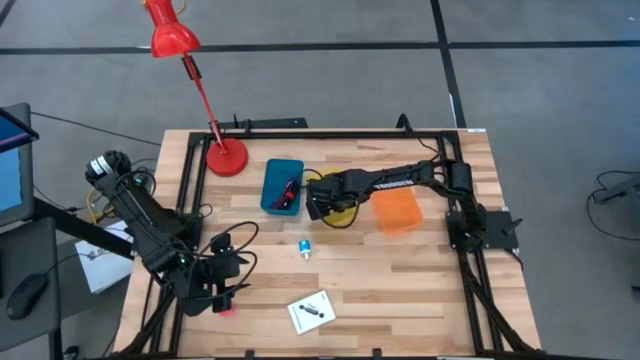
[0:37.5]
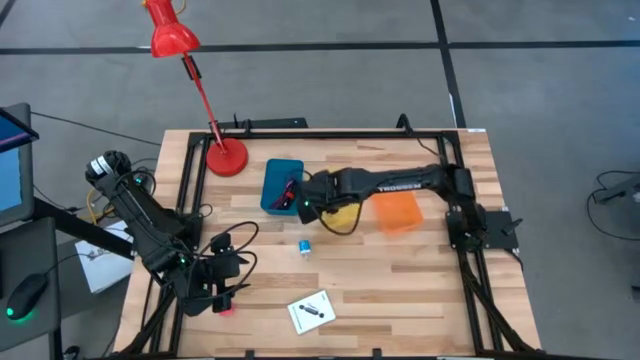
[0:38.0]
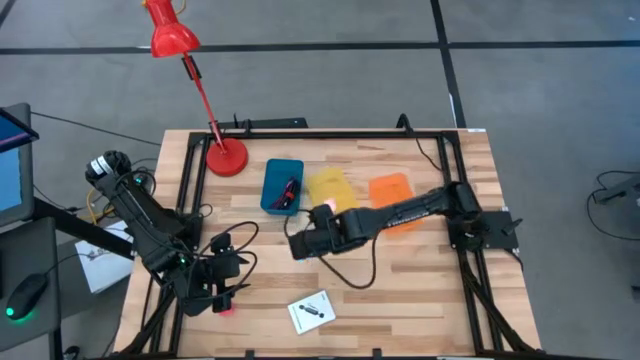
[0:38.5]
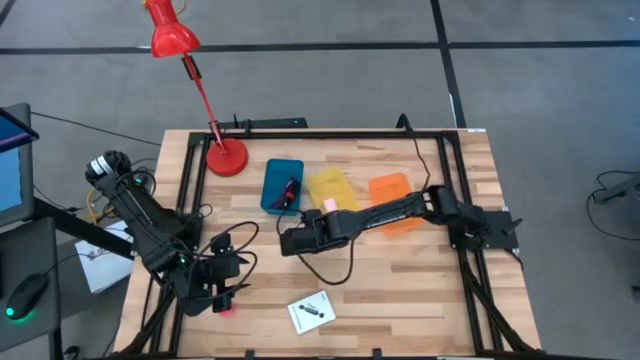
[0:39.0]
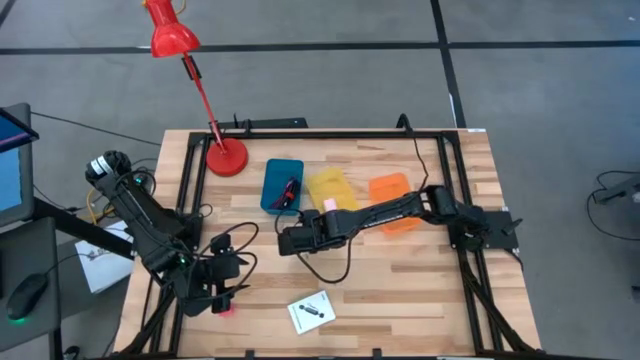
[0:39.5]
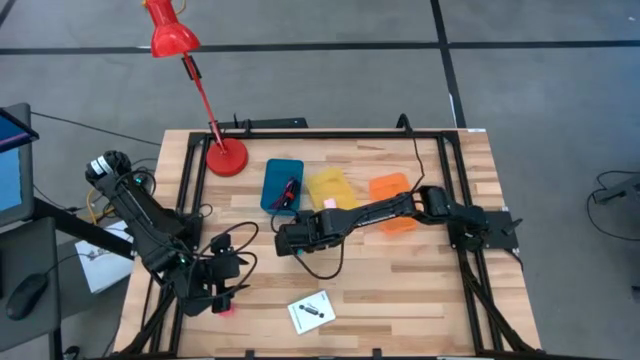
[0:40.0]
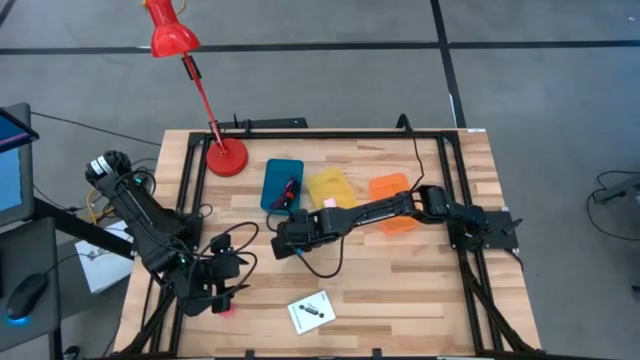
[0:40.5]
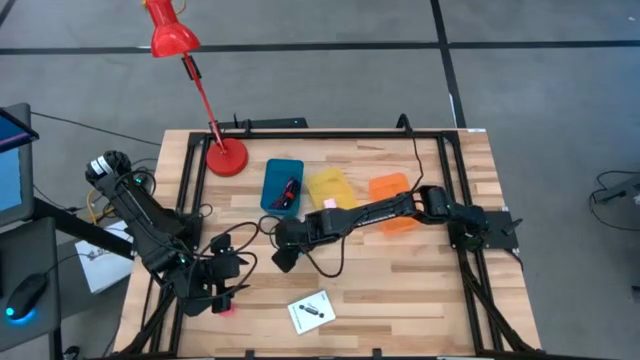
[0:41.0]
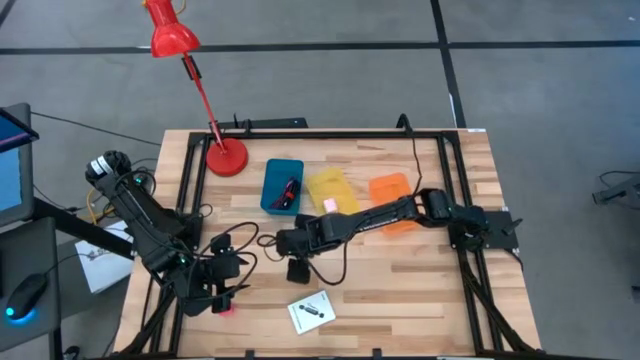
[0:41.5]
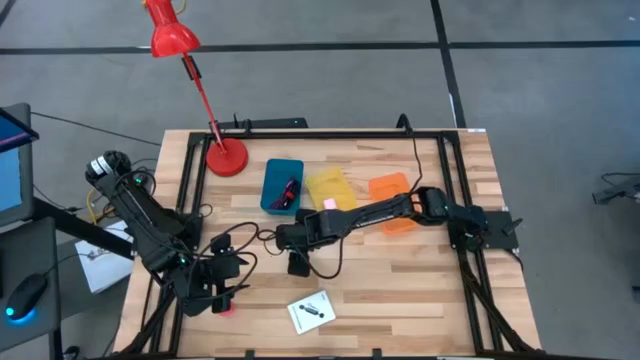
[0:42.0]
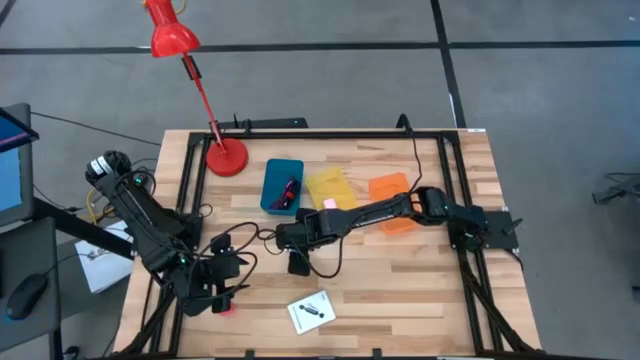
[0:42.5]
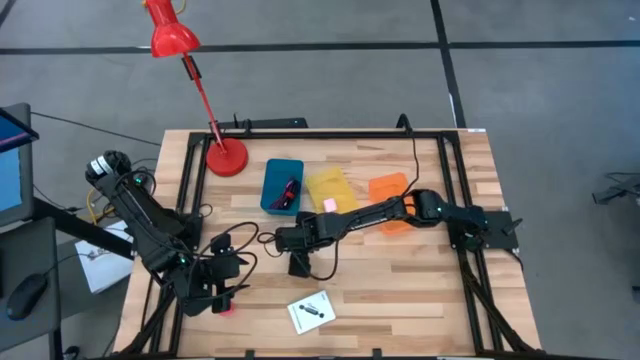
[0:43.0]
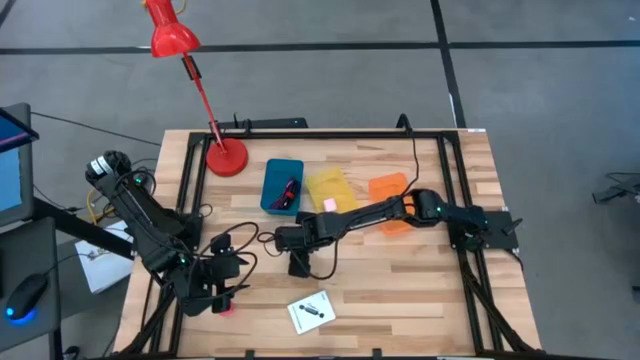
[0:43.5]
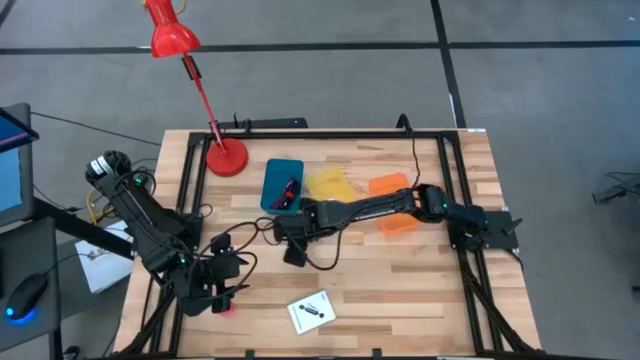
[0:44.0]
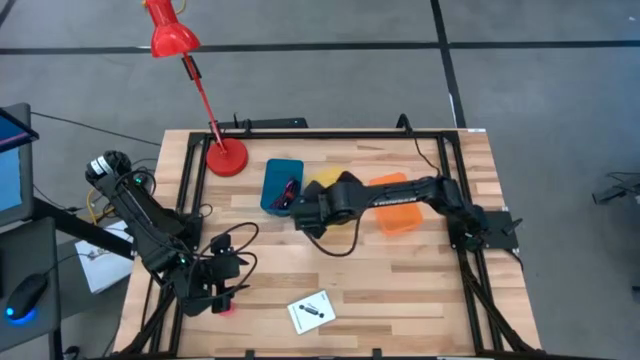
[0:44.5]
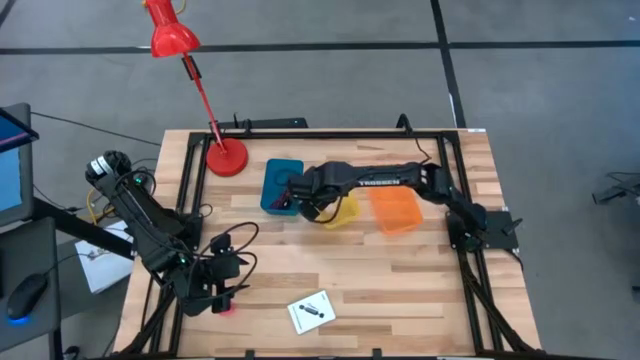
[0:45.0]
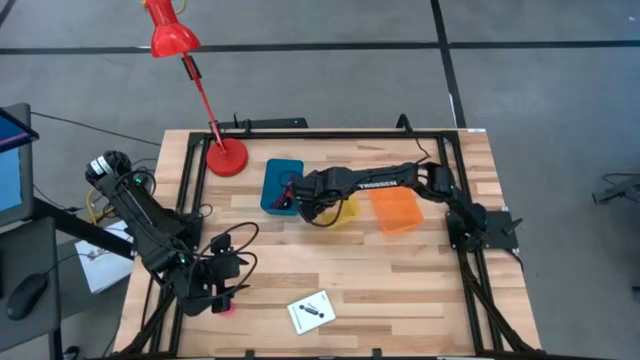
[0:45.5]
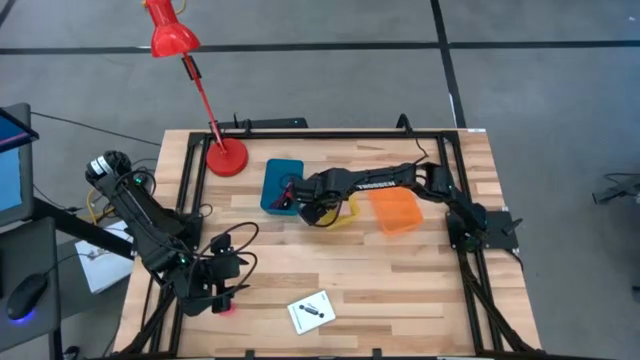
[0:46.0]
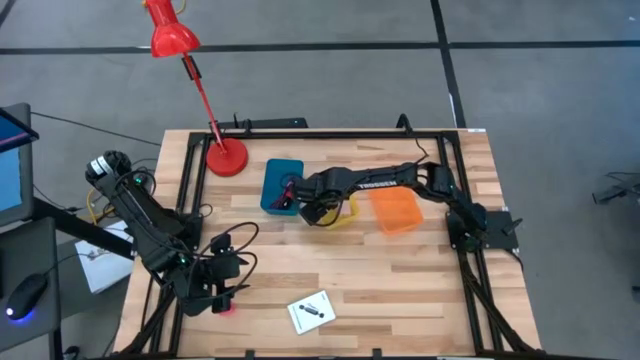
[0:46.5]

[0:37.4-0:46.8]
Task: Pick and place items into bin
Put the blue charger adapter into the yellow bin

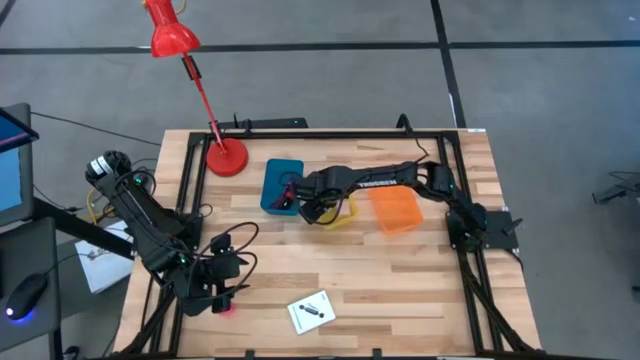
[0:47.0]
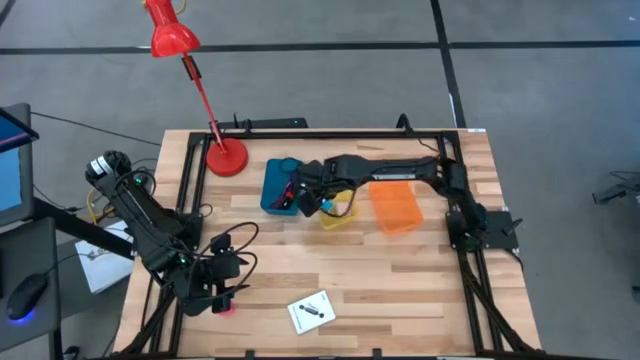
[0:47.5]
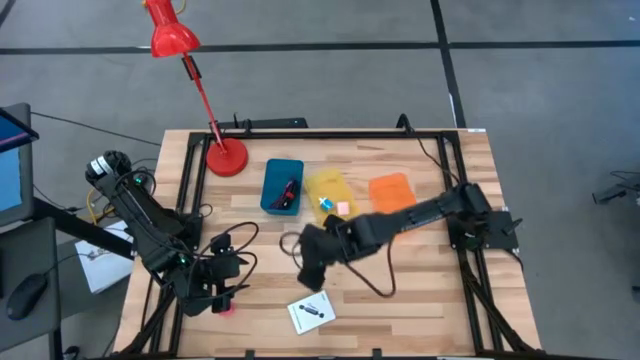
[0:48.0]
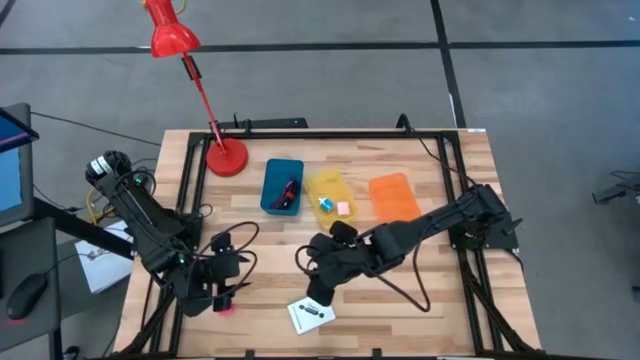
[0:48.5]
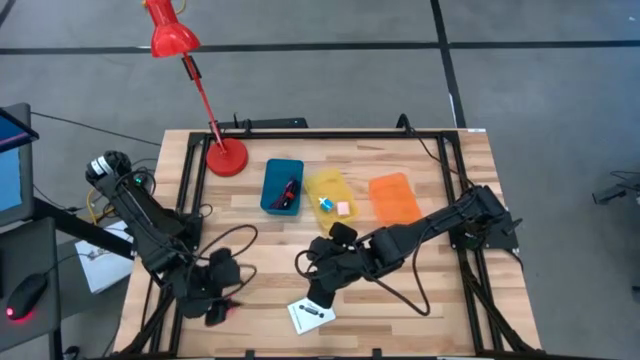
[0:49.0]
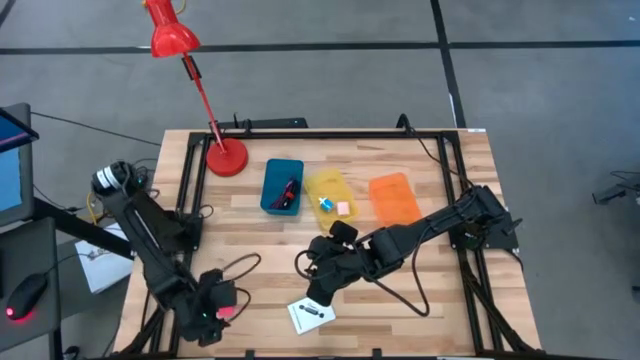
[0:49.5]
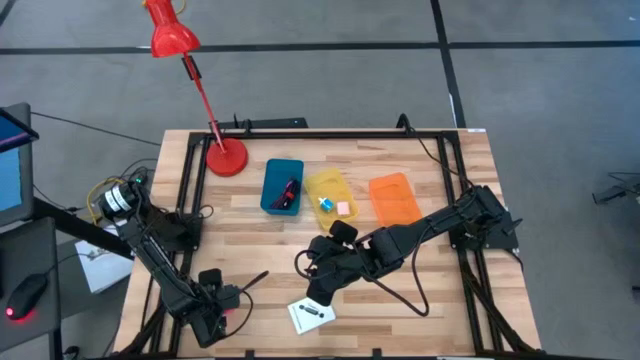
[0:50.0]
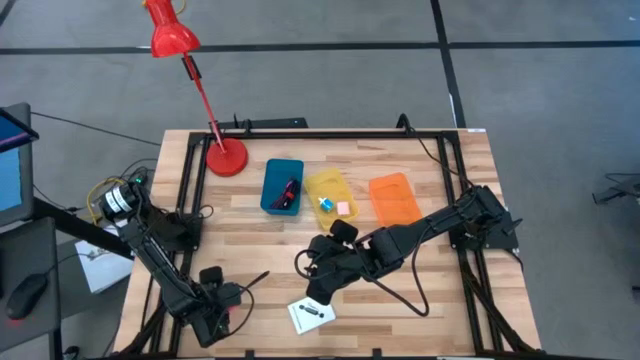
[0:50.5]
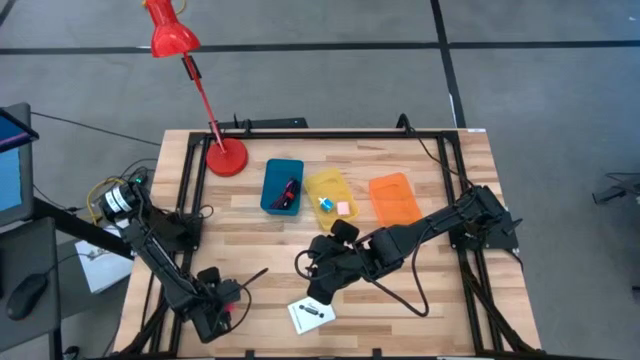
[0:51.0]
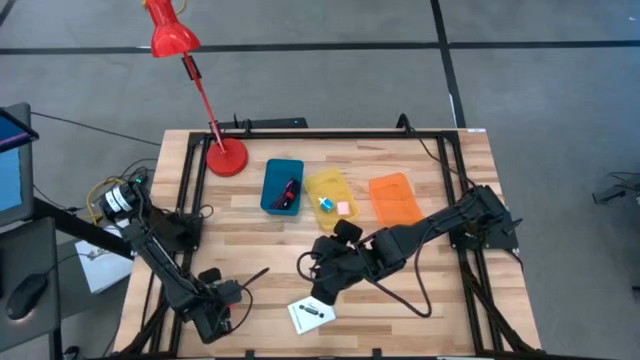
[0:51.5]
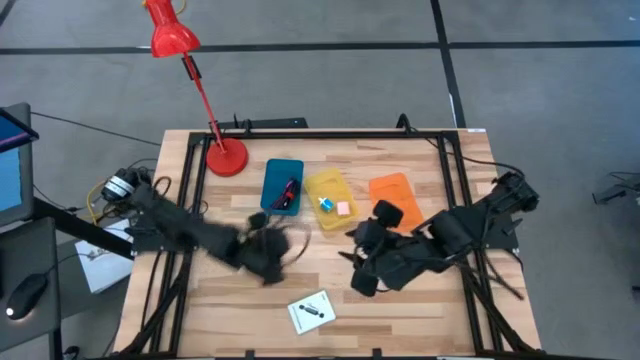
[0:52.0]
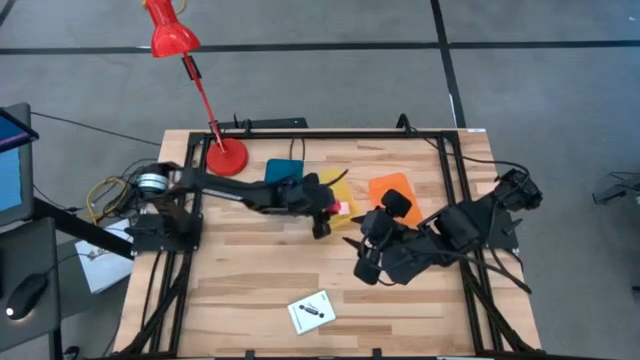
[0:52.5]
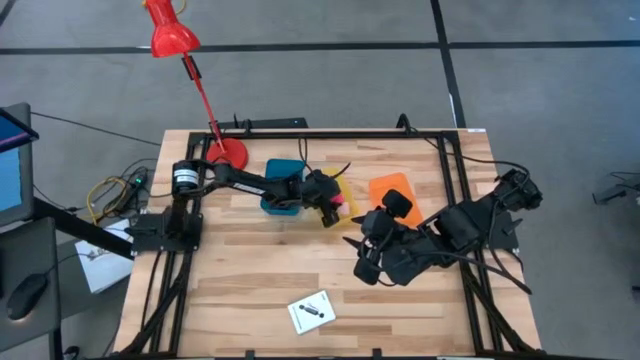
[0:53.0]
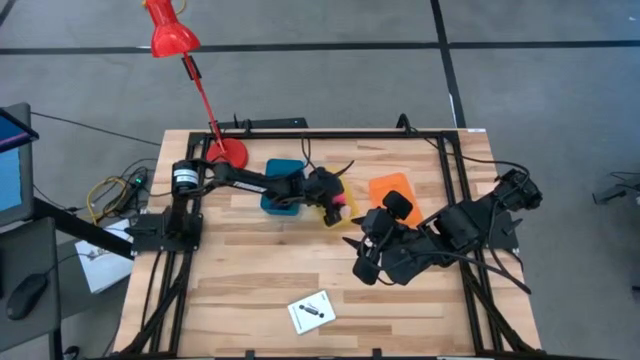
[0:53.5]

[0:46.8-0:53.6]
Put the pink charger adapter into the yellow bin

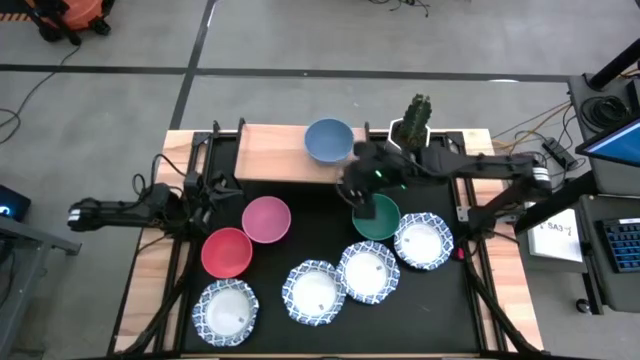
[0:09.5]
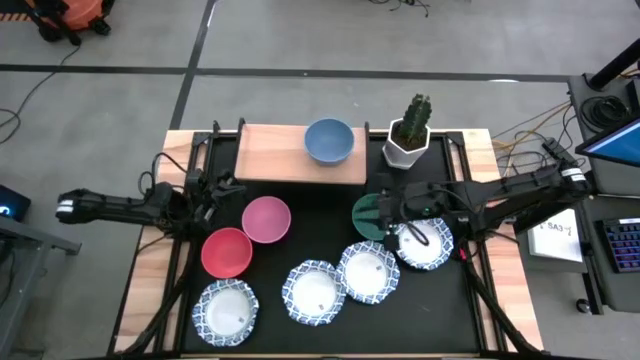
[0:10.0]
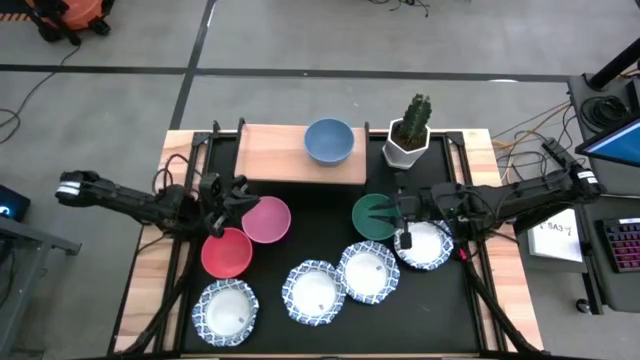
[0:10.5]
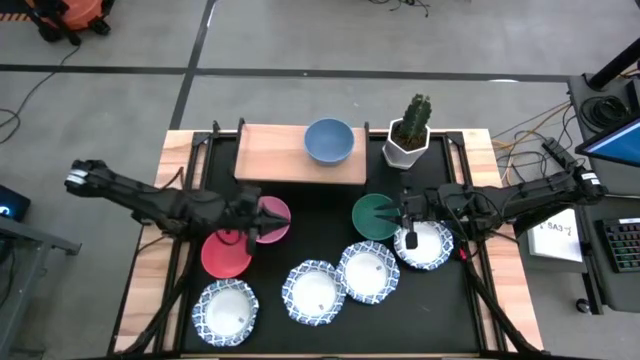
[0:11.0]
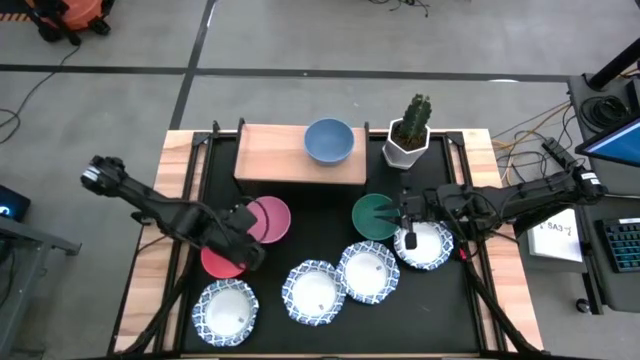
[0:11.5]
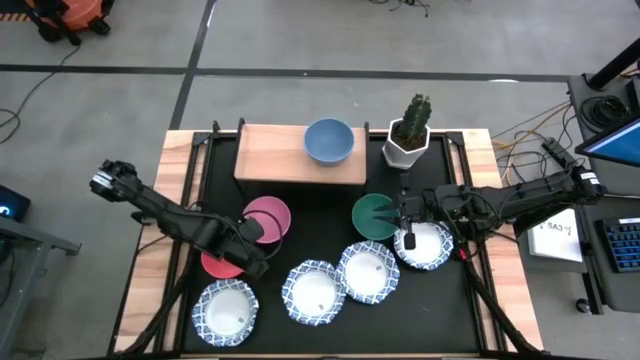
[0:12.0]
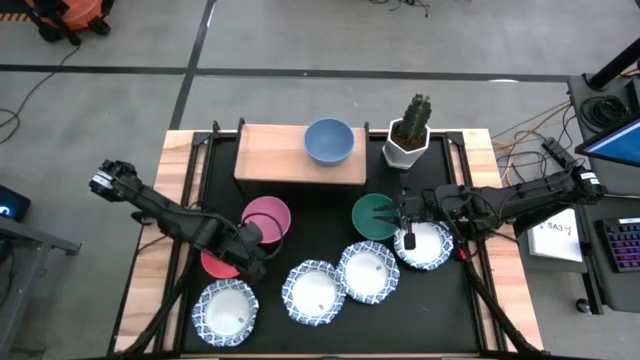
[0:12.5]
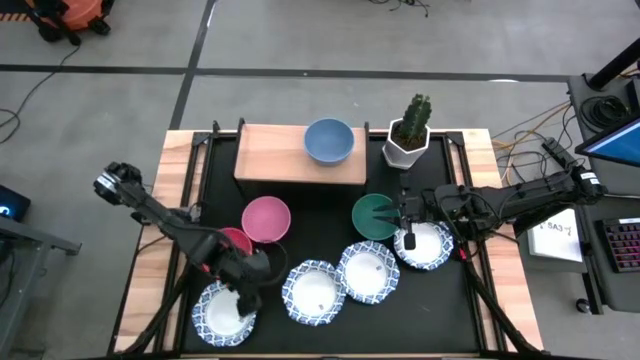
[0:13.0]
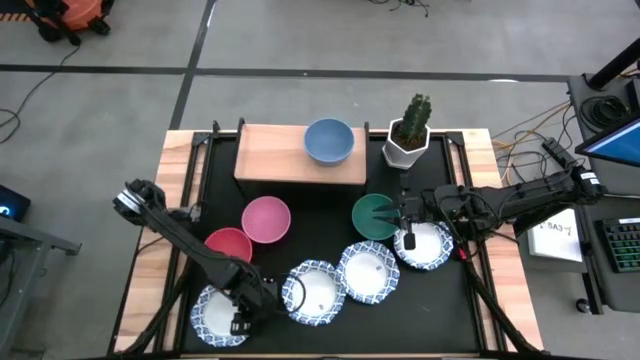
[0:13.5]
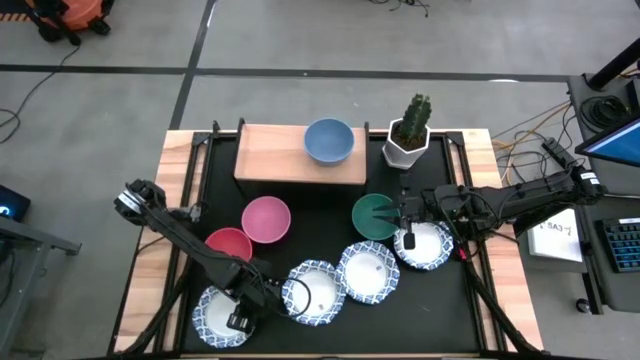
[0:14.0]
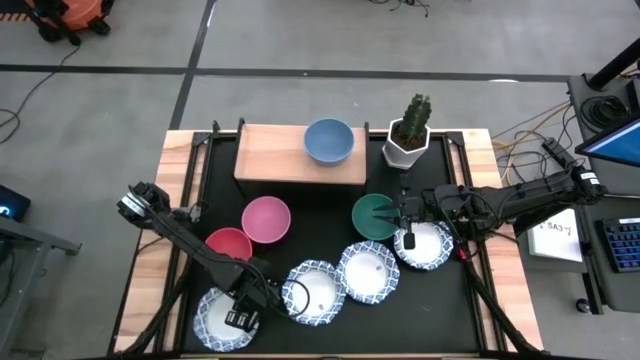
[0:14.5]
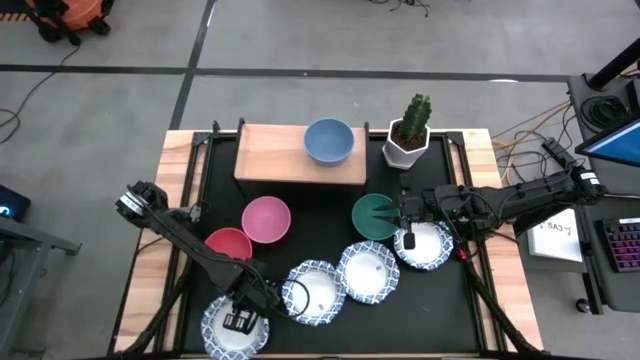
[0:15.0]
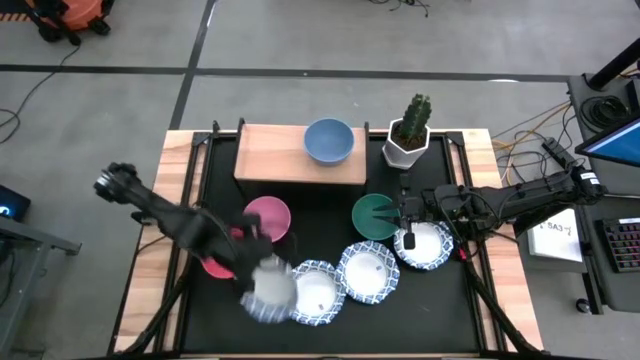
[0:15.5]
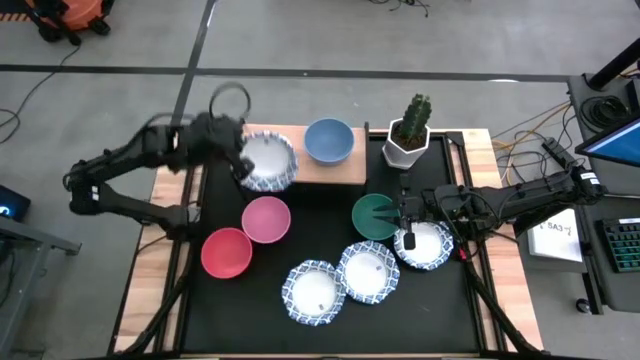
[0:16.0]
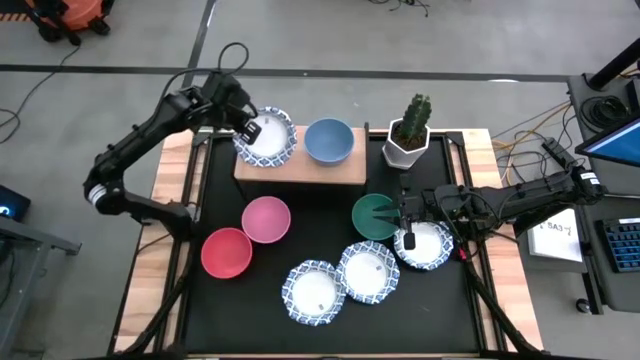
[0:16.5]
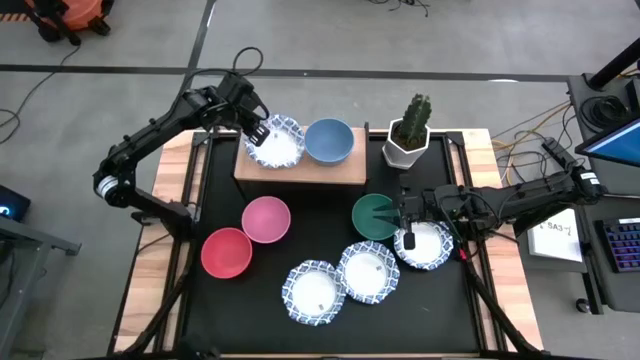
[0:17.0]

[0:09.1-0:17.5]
Task: Place and stack bowls onto a shelf
Put the blue patterned bowl on the shelf
